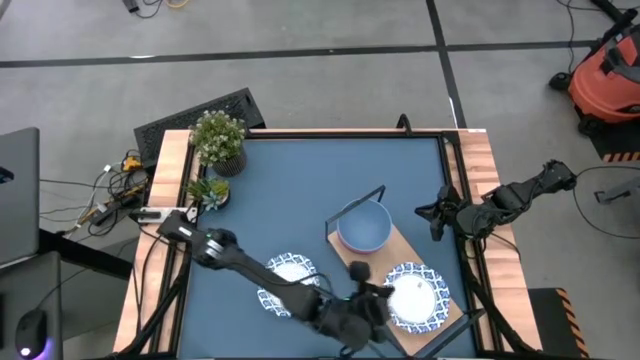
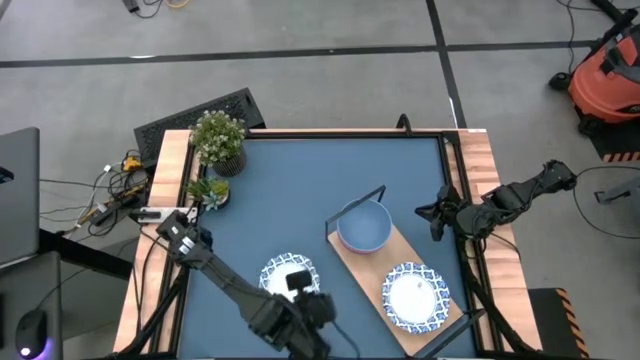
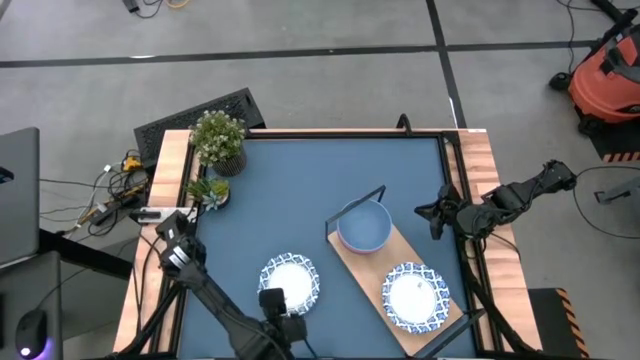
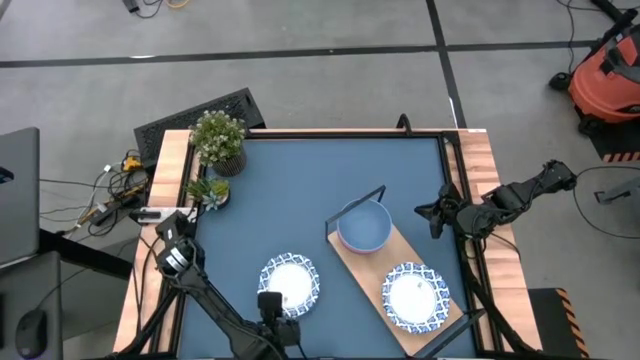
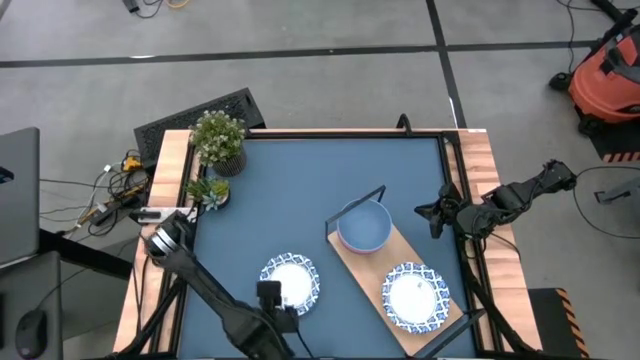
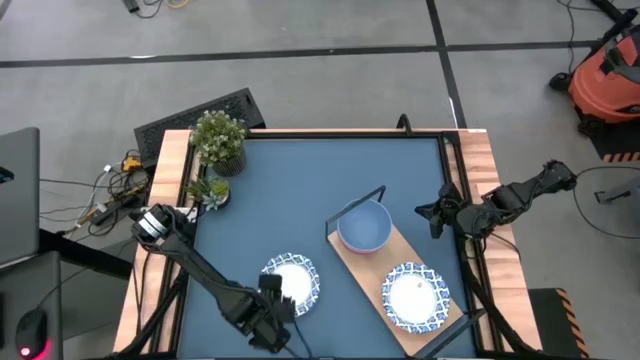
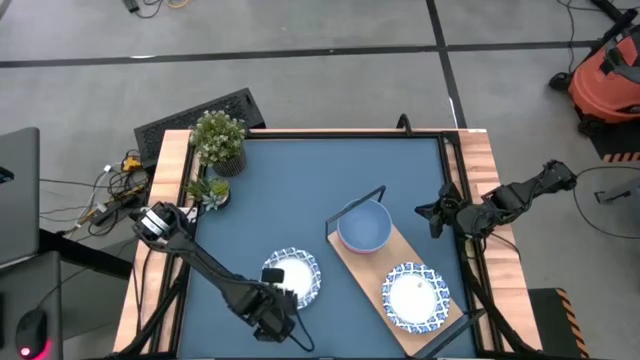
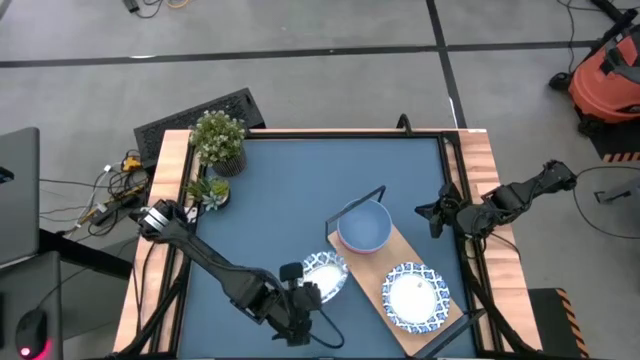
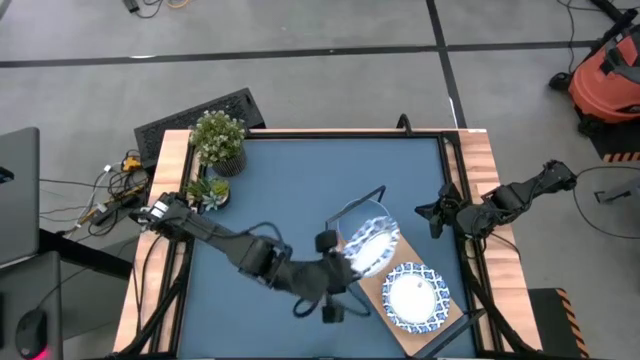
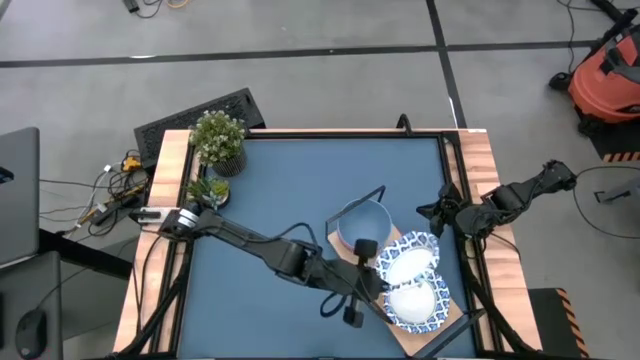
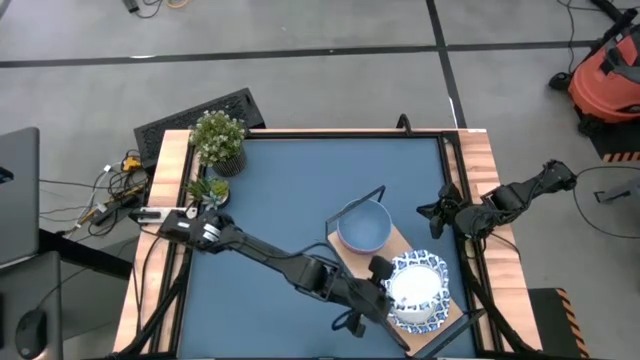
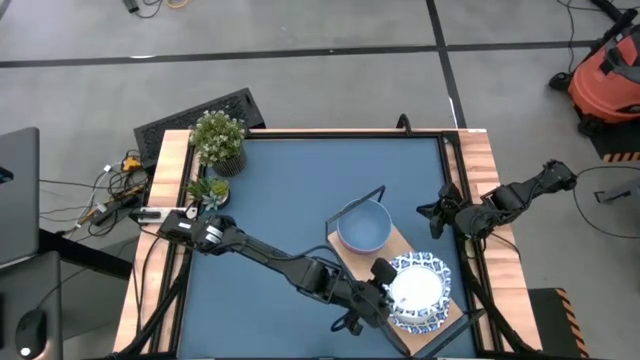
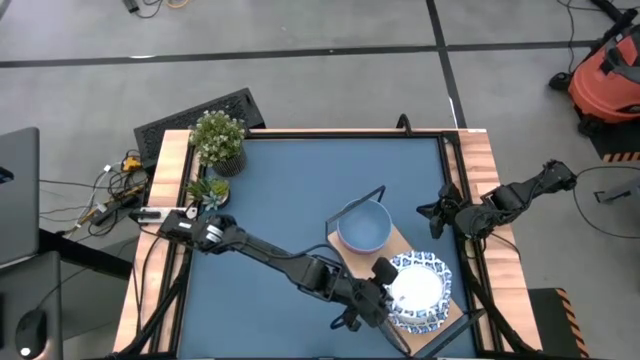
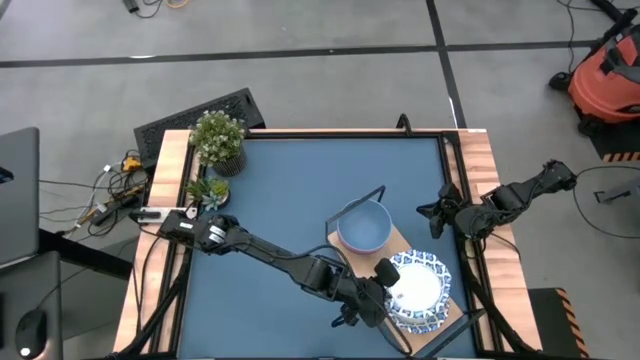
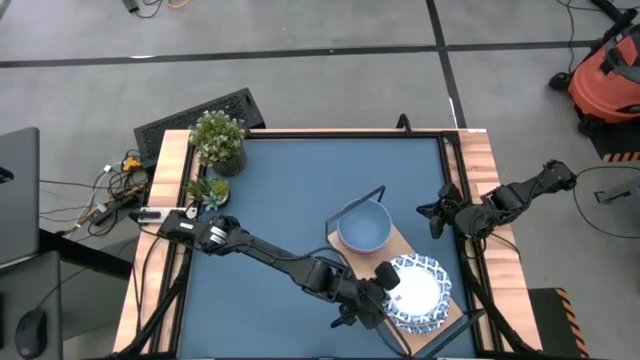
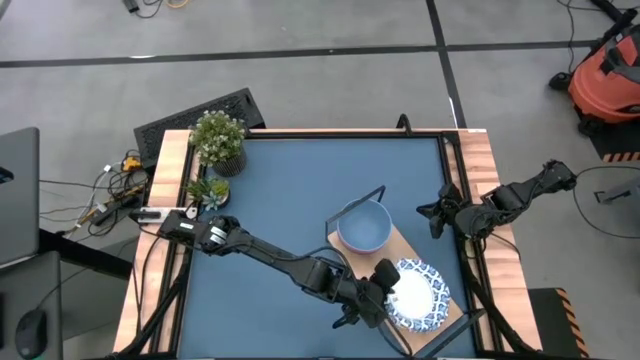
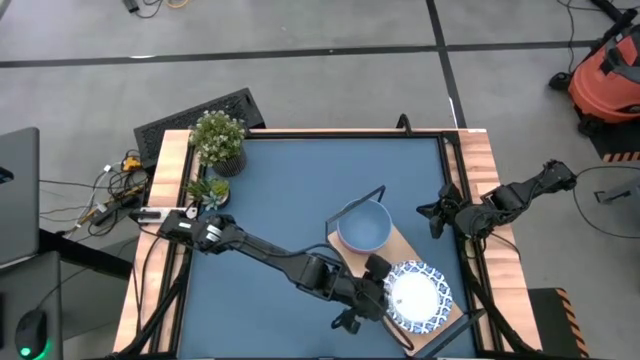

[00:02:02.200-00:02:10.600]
Task: Place and stack bowls onto a shelf
Stack the white bowl on top of the white bowl on the shelf

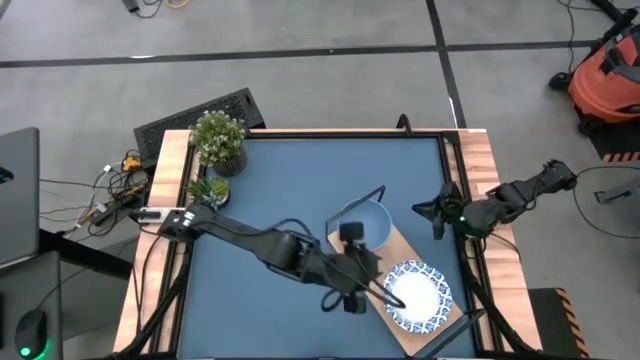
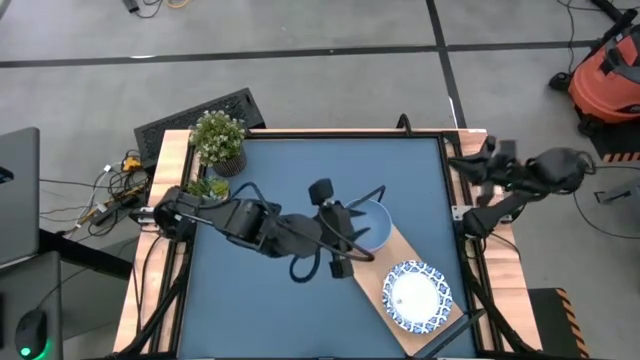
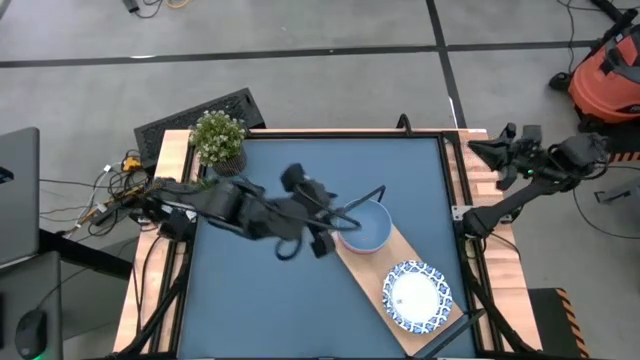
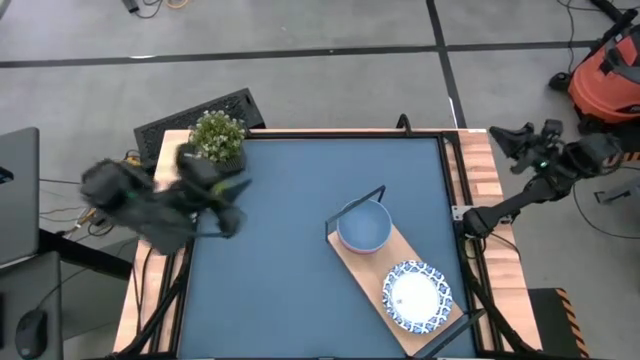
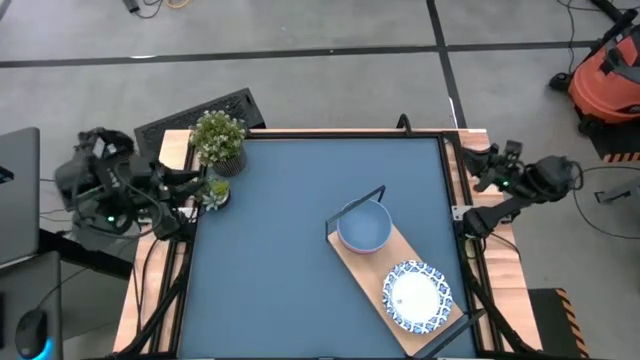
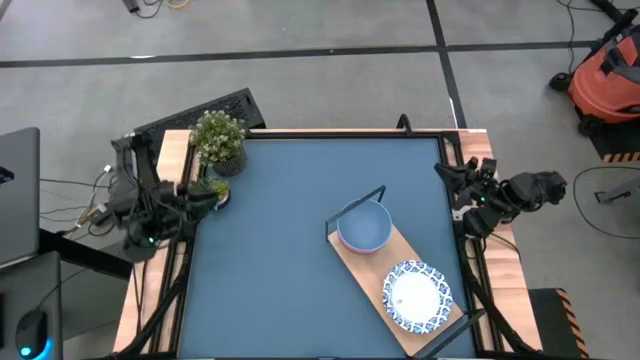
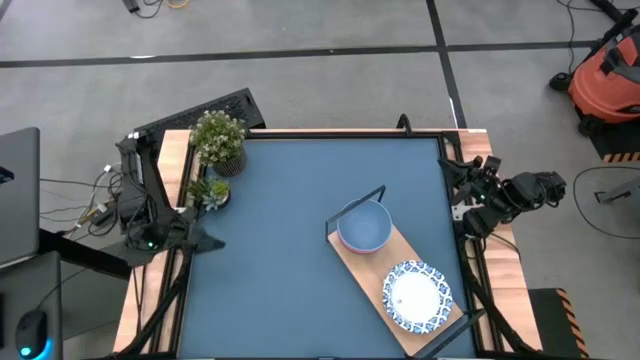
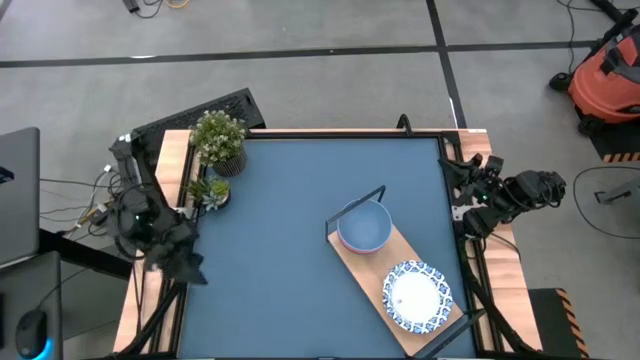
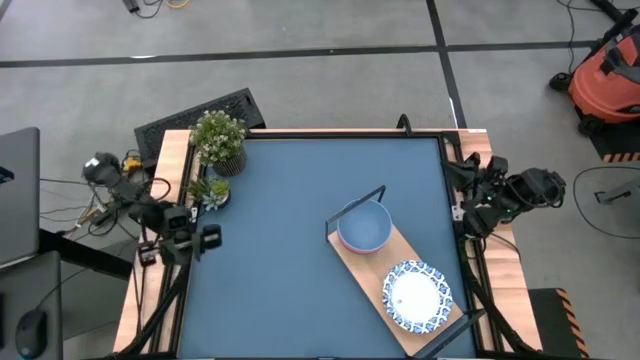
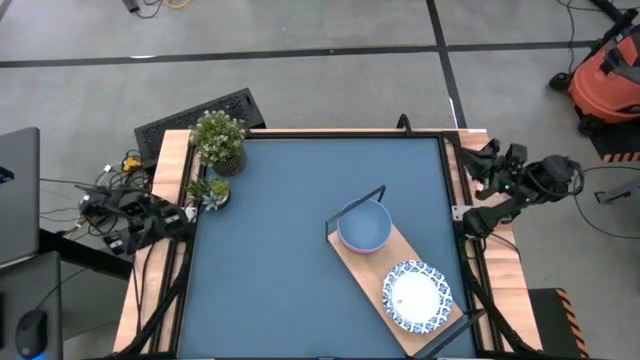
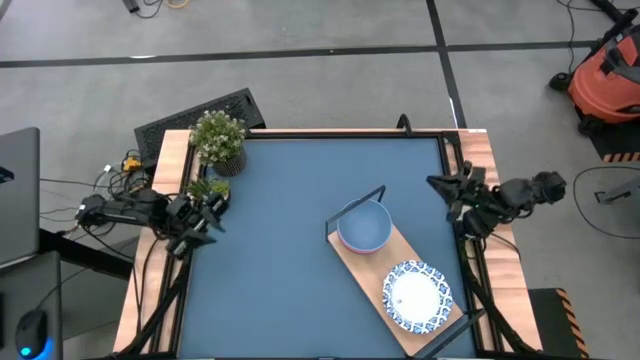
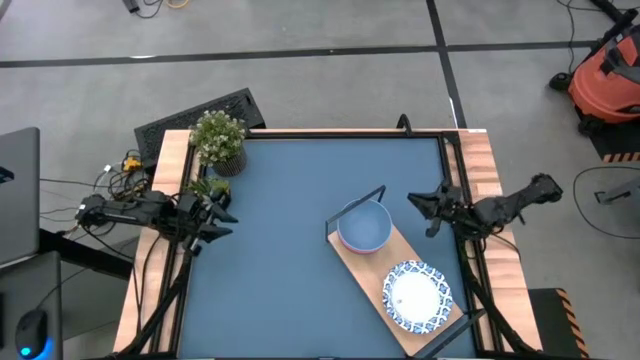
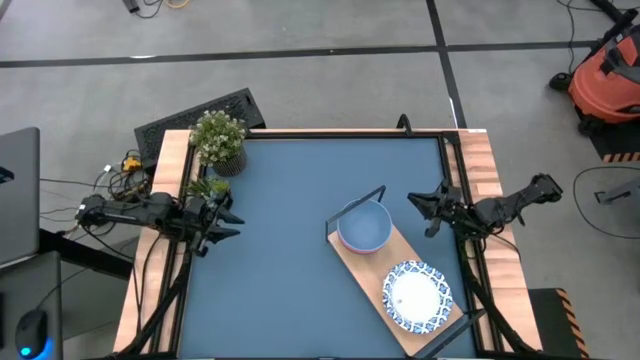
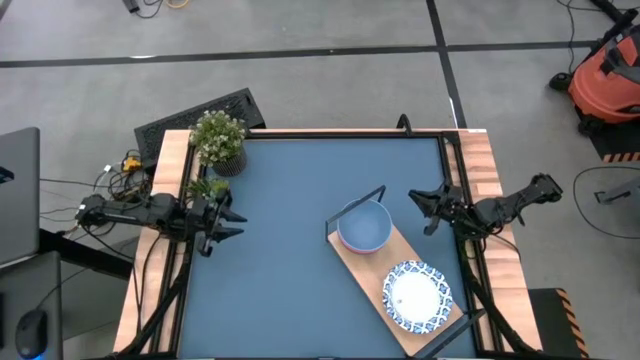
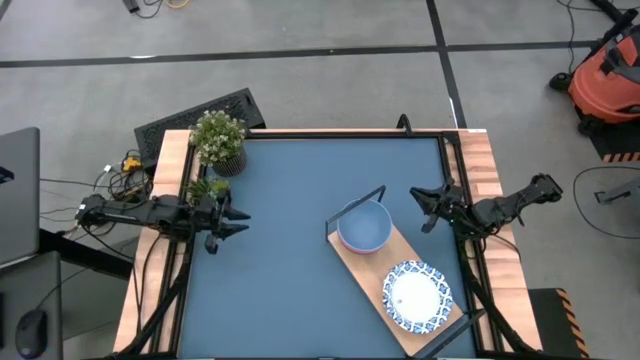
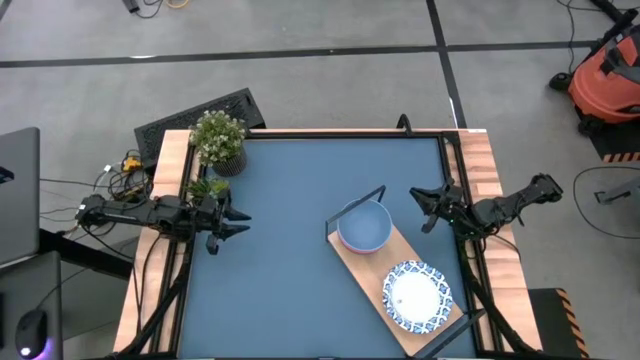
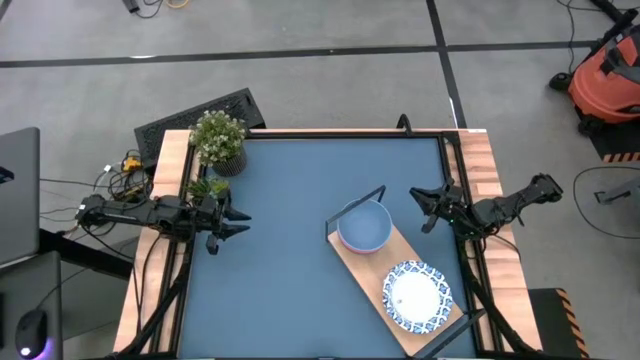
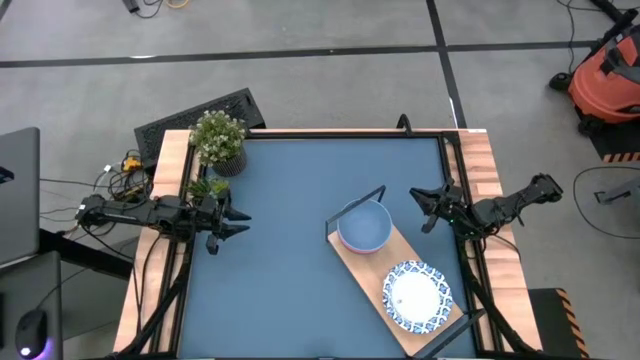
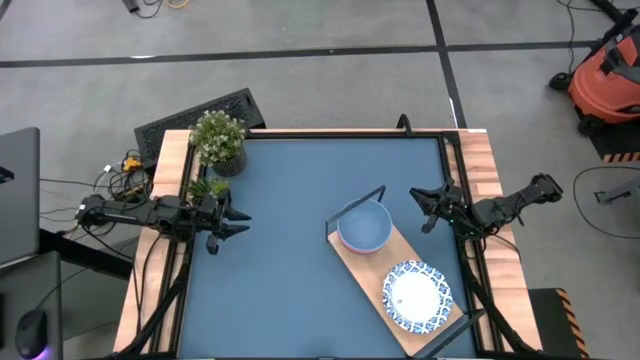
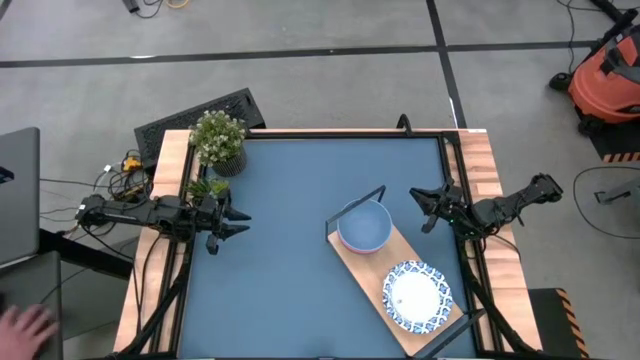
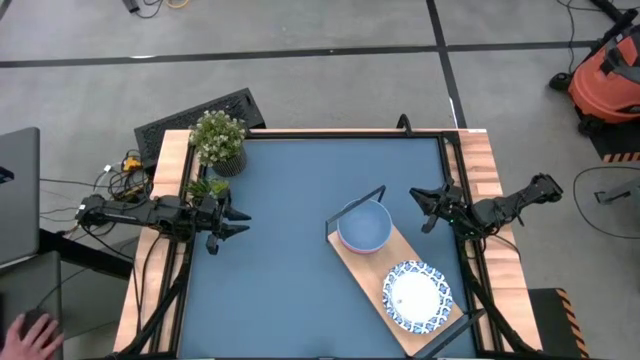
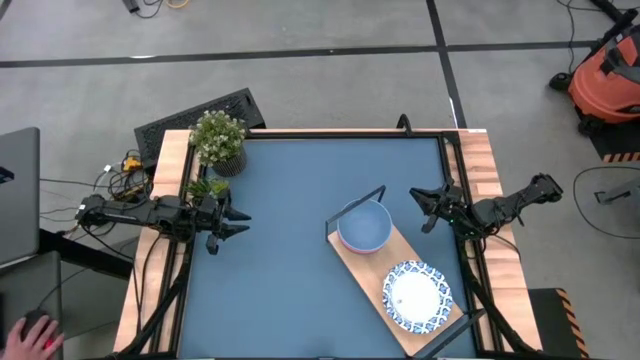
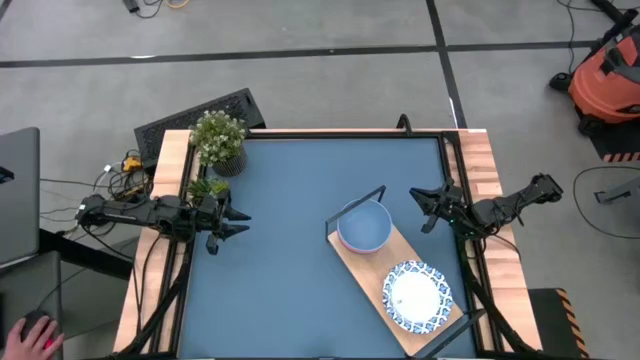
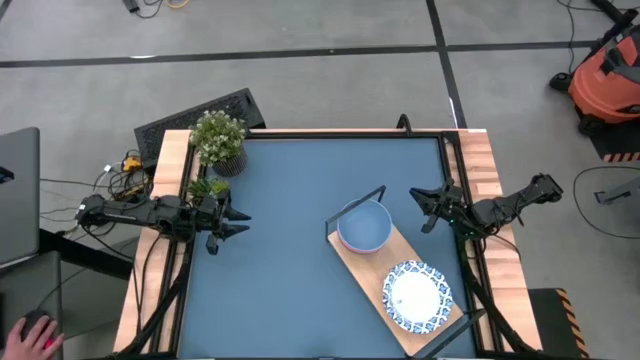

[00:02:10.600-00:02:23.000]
Return to Home Position
